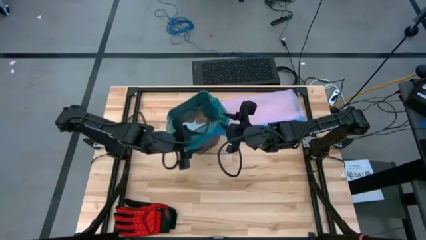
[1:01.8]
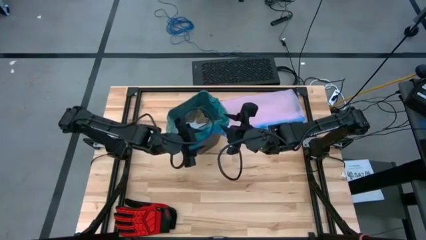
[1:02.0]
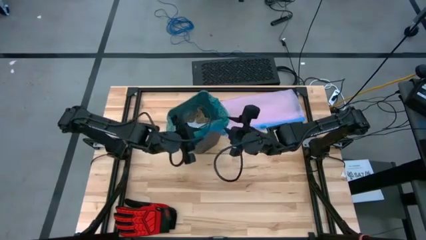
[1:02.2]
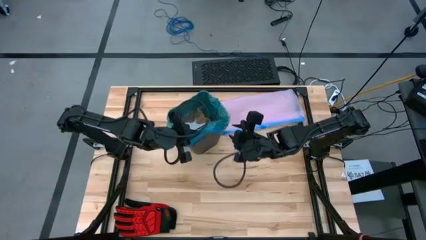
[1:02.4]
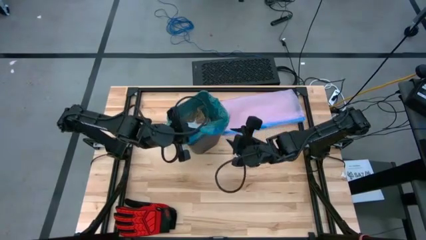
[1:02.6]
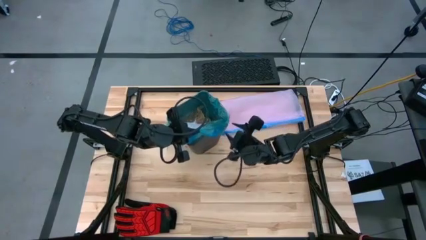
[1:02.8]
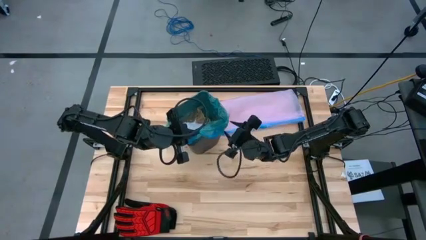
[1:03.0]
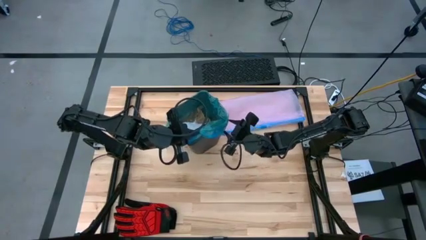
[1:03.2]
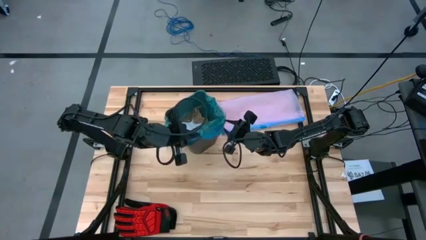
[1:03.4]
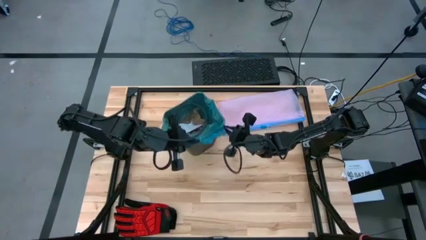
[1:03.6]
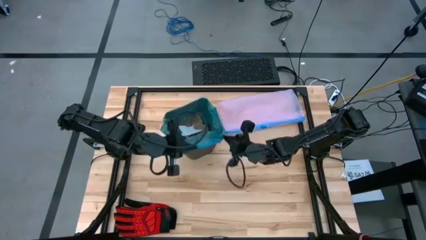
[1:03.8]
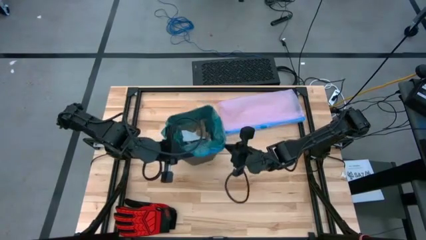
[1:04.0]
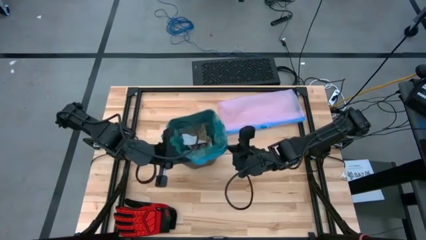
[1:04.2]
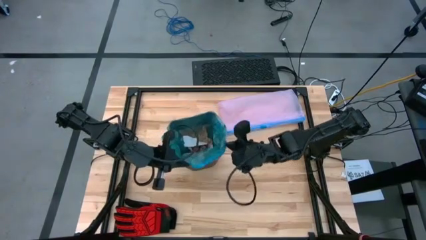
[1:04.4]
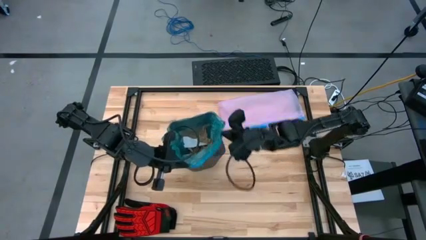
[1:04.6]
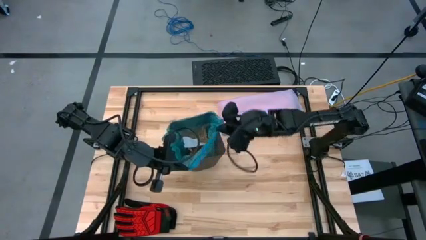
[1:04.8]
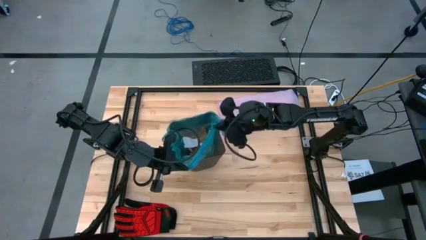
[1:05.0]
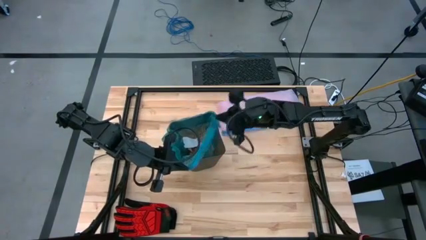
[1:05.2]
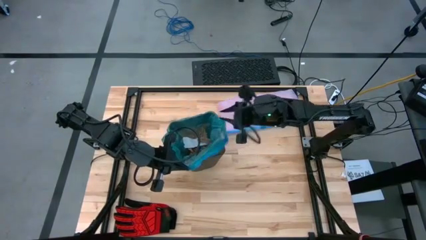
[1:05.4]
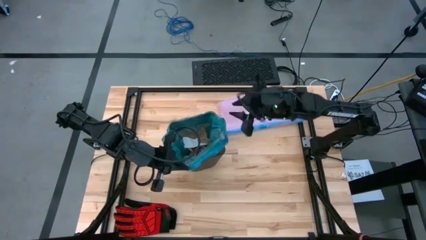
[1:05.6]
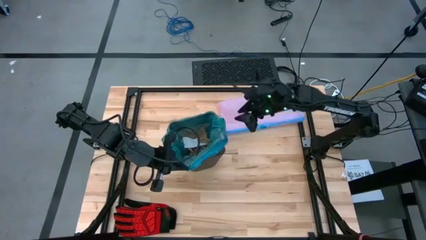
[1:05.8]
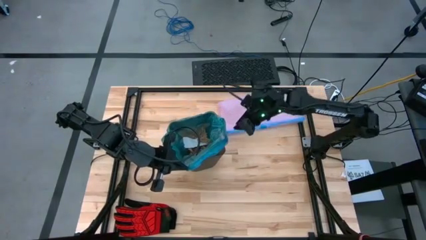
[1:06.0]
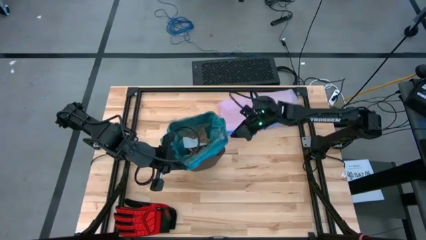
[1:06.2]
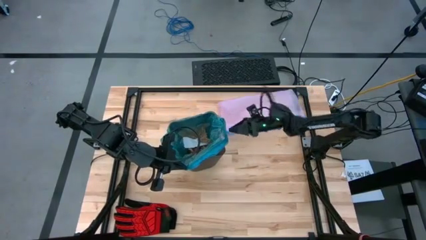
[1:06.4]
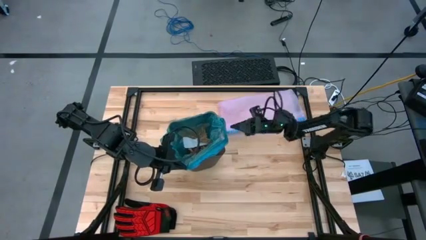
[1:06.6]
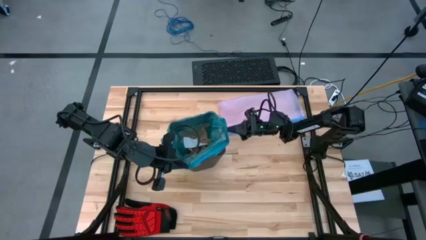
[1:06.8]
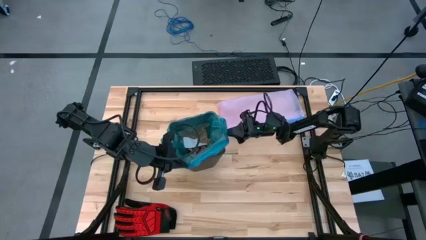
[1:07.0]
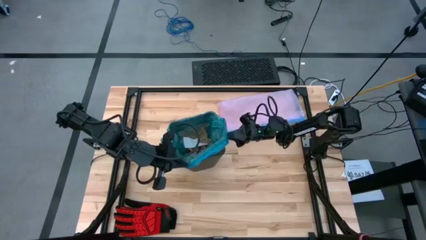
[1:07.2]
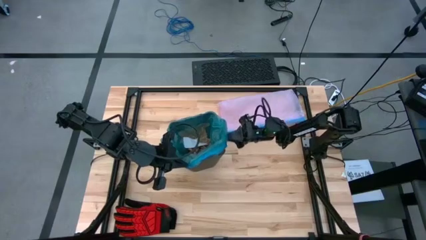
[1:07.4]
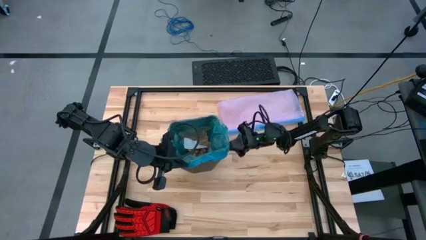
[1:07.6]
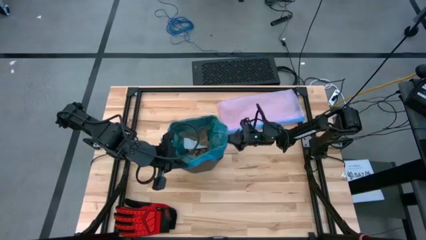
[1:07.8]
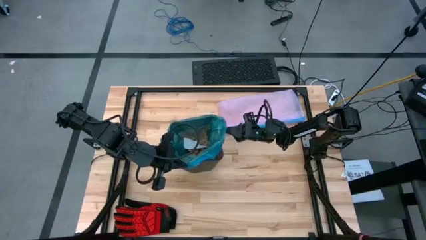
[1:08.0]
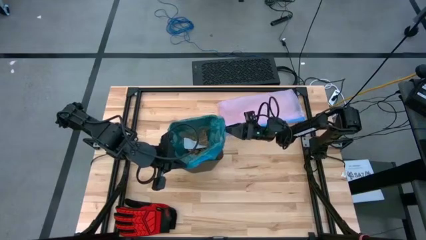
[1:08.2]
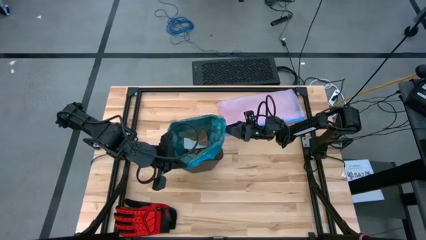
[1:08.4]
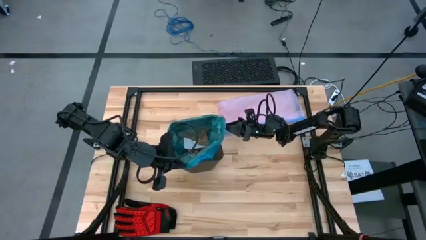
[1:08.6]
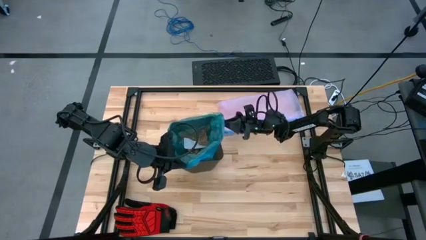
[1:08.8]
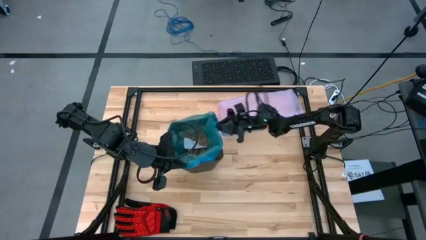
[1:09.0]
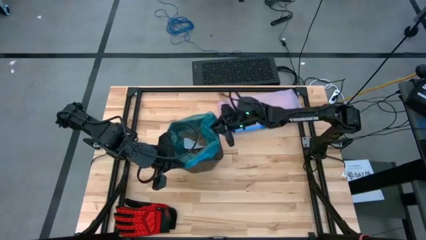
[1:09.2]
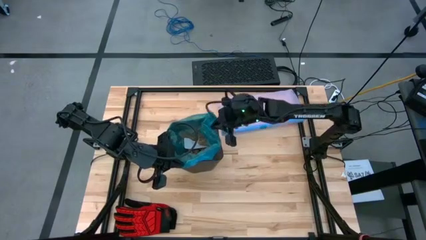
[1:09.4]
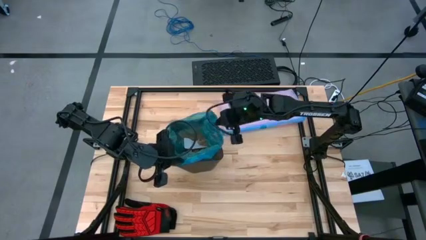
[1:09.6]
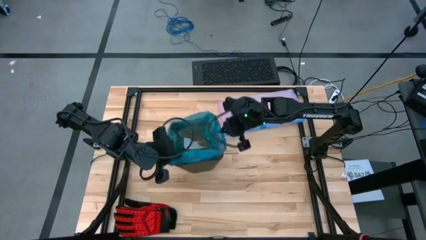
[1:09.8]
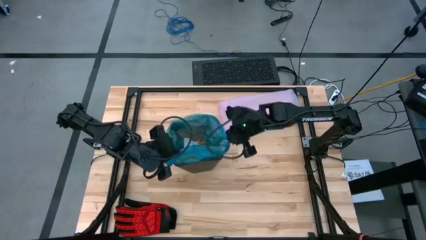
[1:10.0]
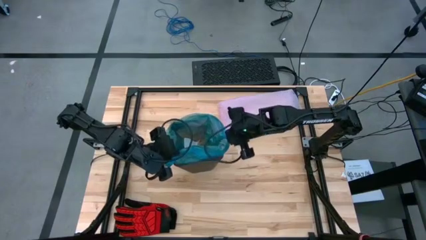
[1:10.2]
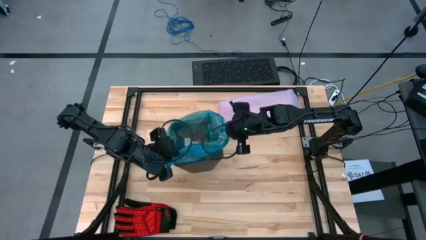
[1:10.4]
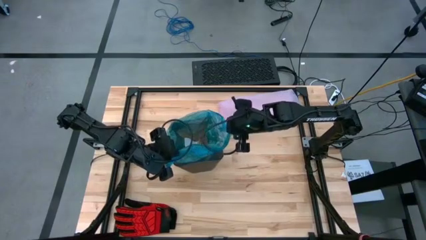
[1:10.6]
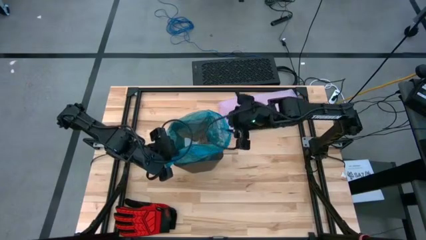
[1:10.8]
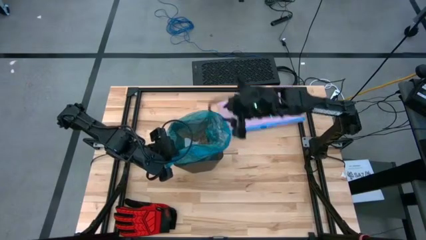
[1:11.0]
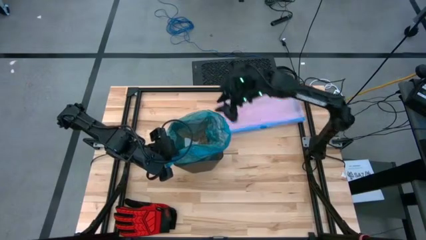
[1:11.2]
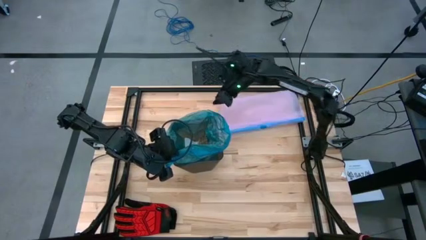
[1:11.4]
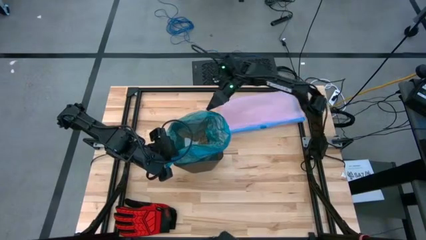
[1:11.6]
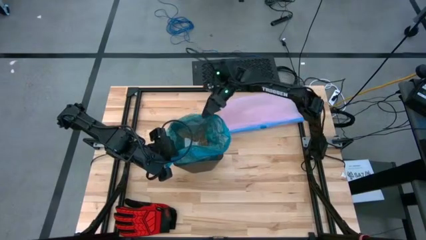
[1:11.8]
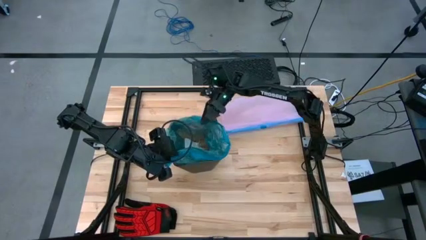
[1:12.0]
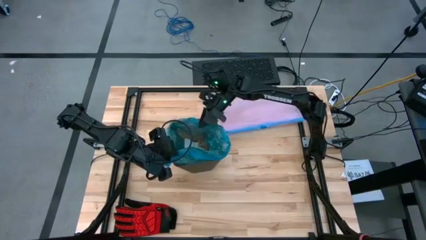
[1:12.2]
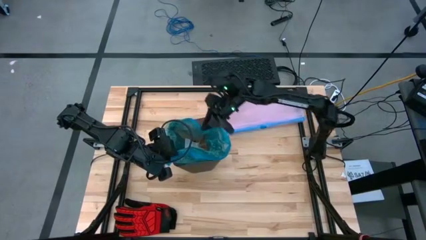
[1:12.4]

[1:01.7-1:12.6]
Task: place trash/remove bag and relplace
Close the trash bag

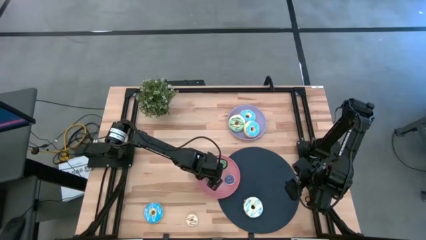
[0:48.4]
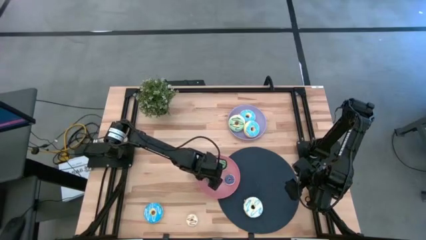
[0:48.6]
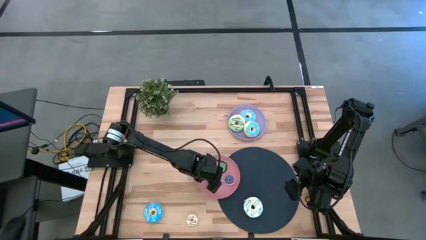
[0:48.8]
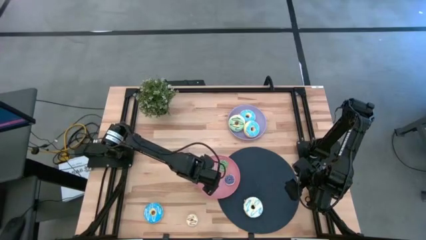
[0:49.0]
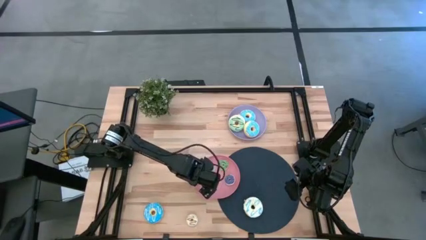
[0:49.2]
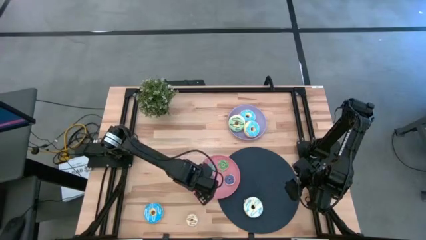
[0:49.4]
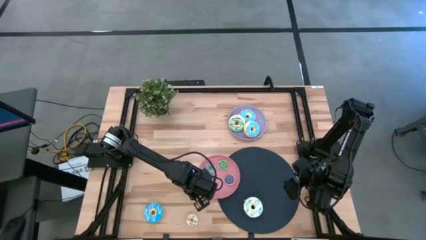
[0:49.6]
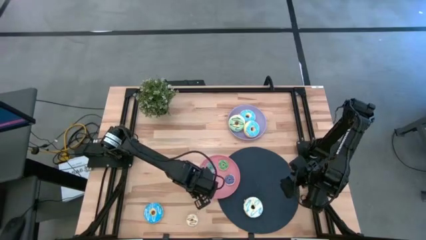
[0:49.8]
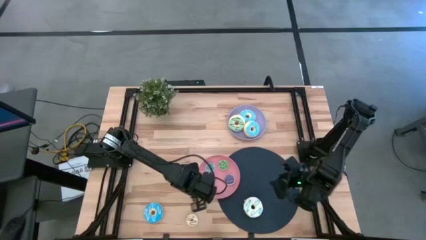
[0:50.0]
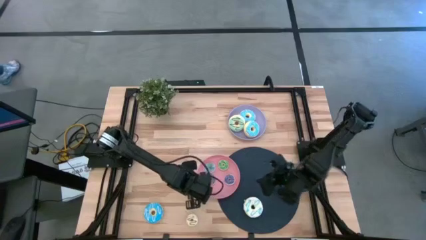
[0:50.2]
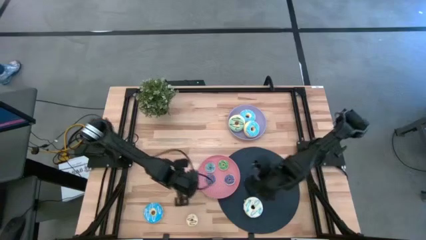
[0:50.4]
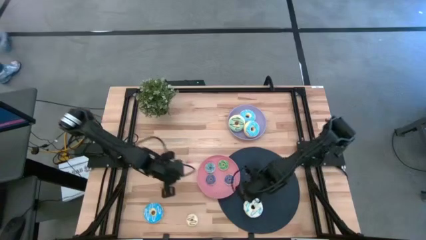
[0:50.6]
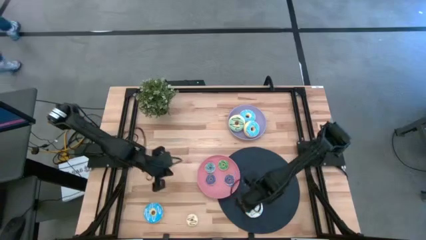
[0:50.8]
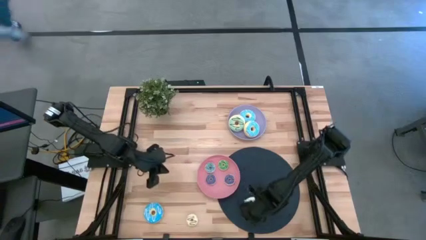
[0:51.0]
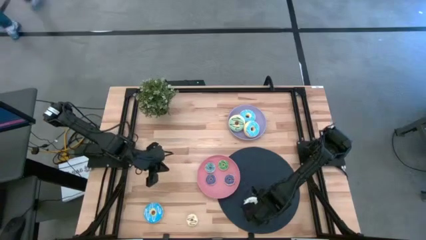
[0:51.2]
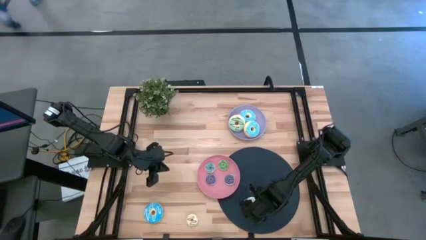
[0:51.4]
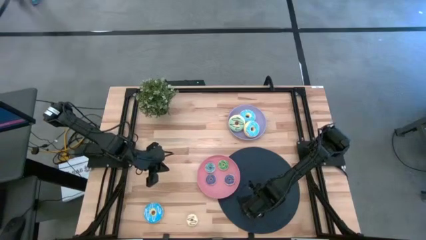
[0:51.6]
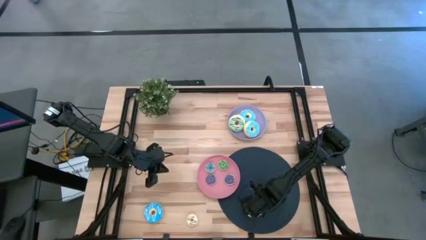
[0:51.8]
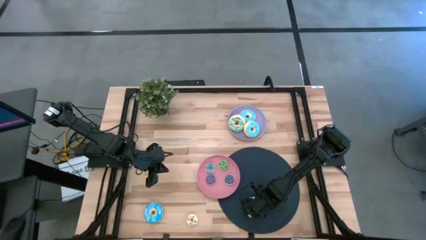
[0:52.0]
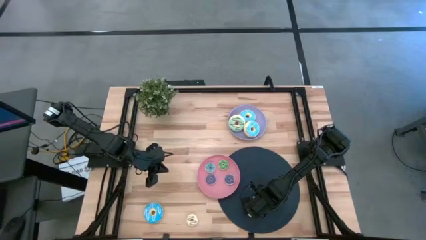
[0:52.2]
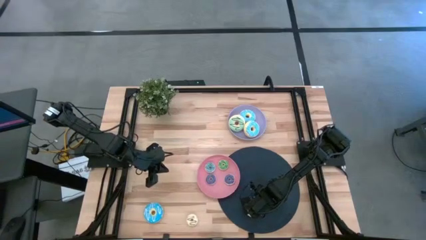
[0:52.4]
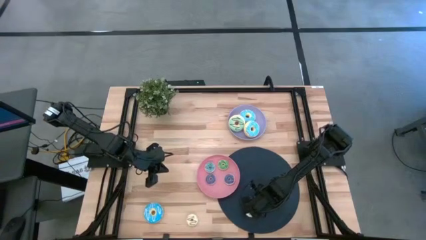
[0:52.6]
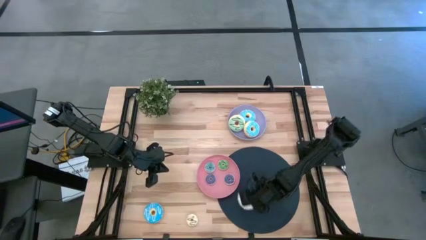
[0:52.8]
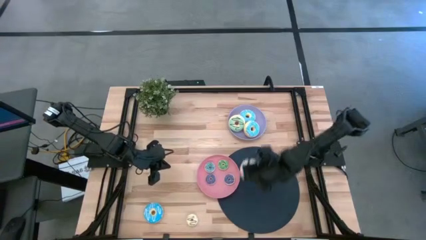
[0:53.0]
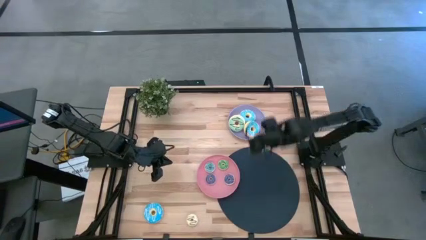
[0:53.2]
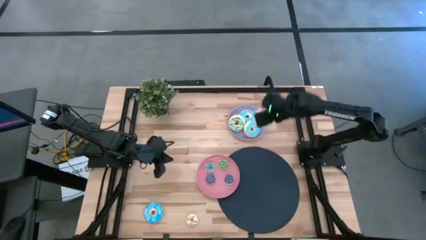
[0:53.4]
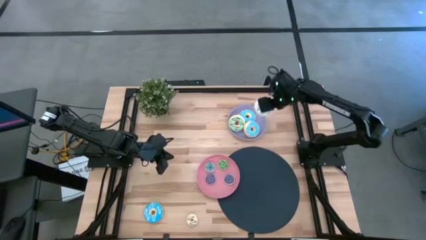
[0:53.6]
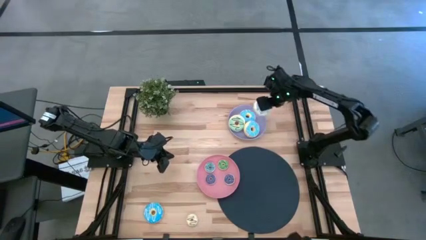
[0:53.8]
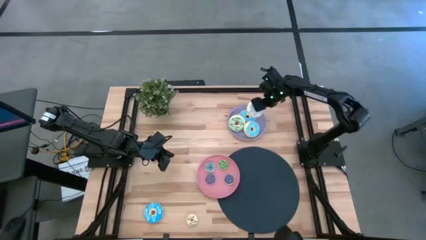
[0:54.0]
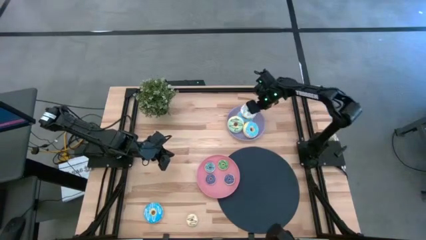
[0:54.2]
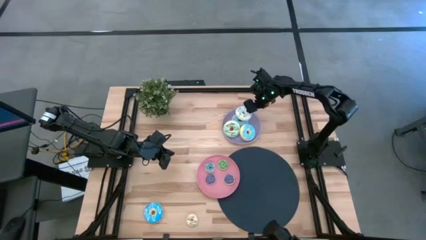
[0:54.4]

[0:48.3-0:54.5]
Task: Pick & Place donuts
Put the big white donut on the purple plate
